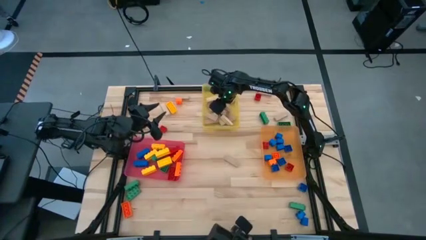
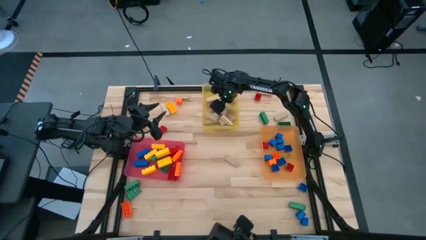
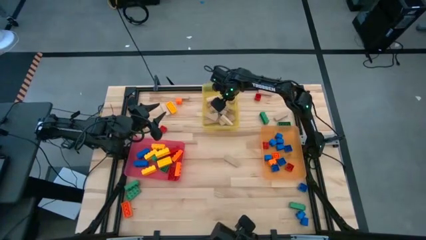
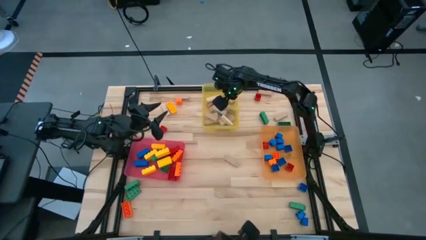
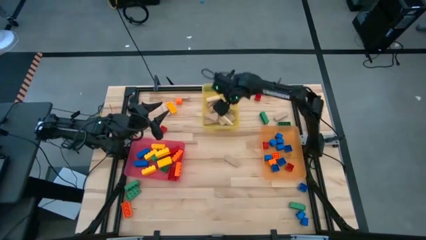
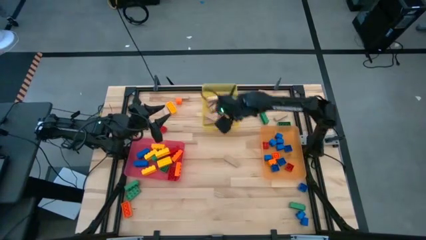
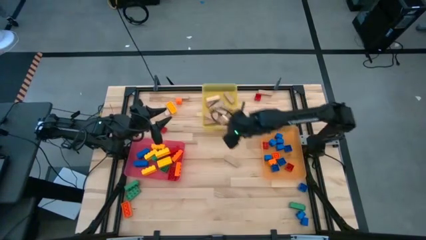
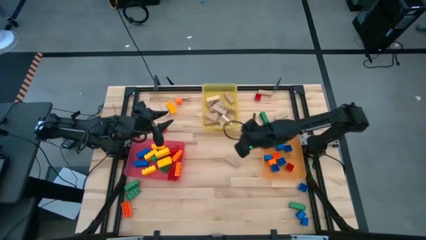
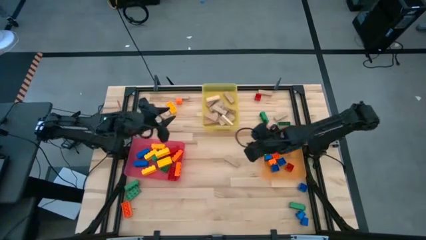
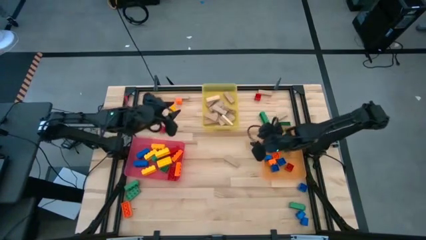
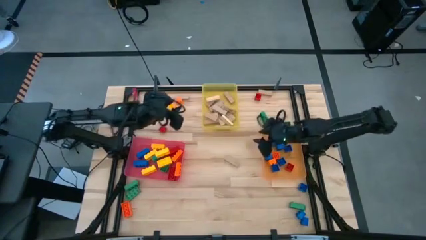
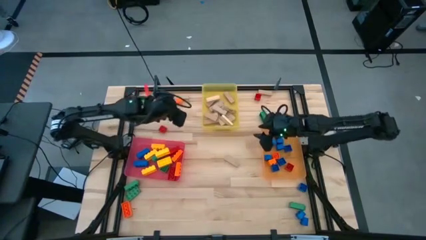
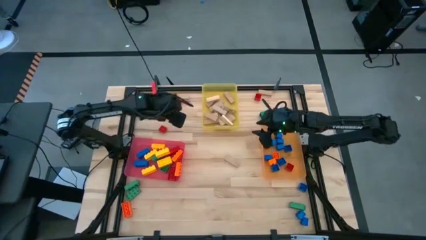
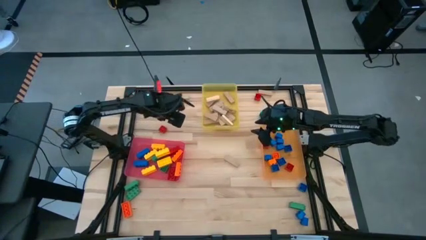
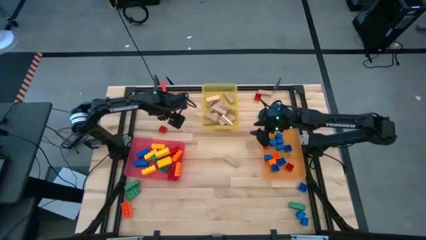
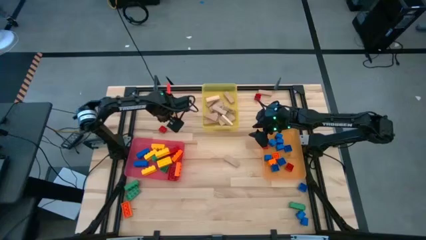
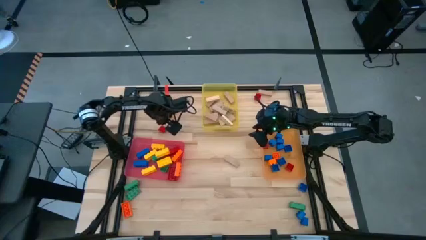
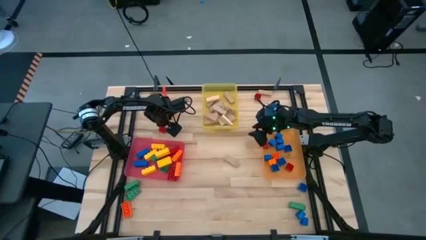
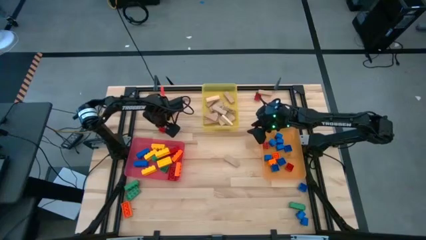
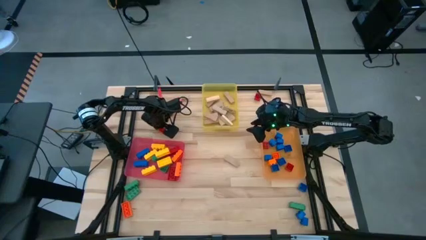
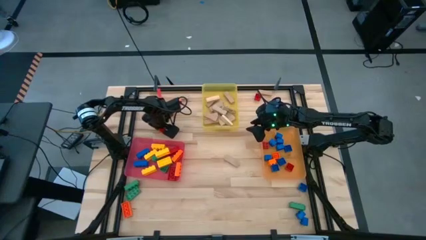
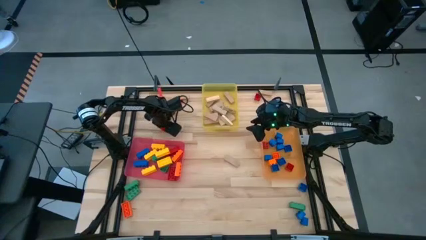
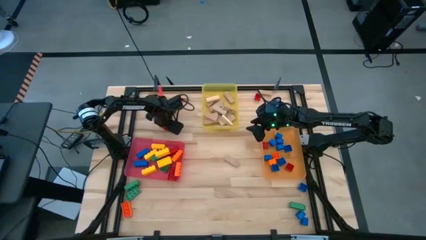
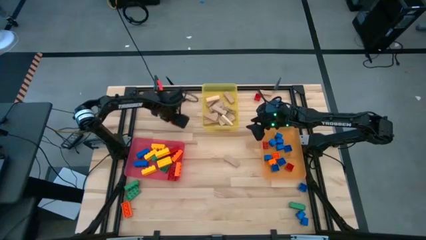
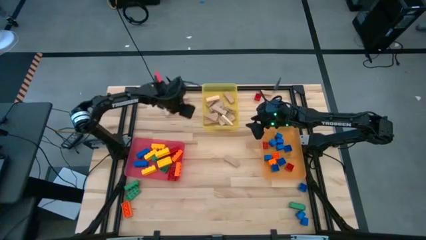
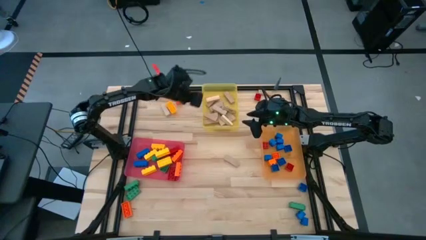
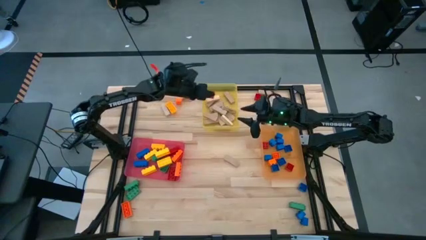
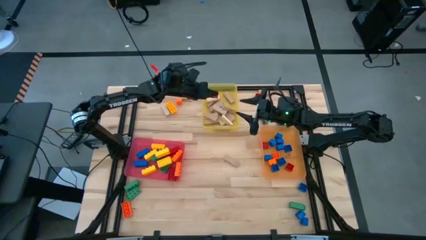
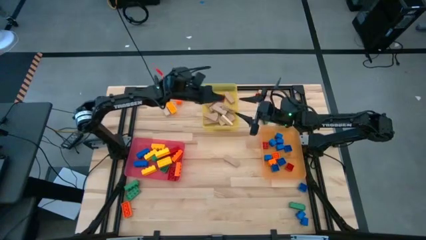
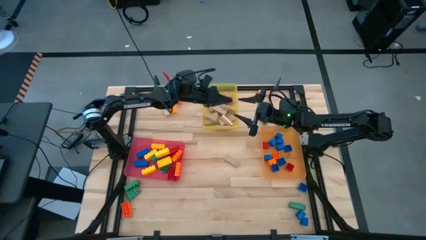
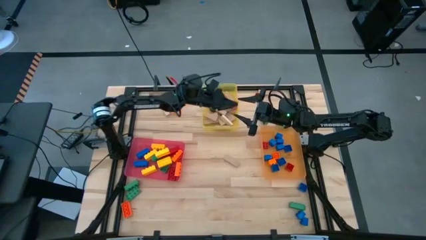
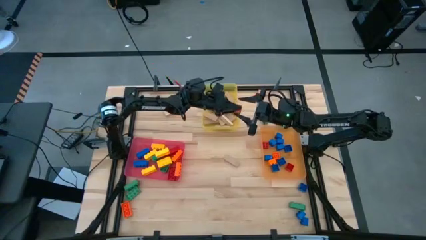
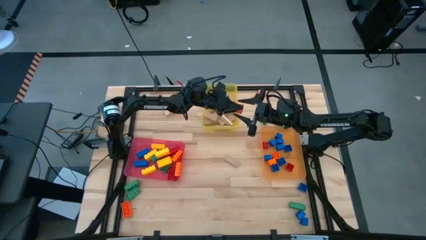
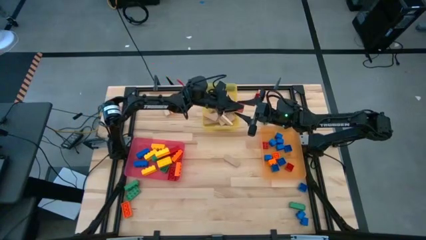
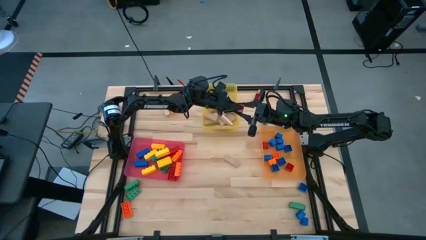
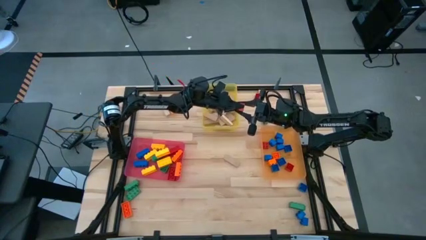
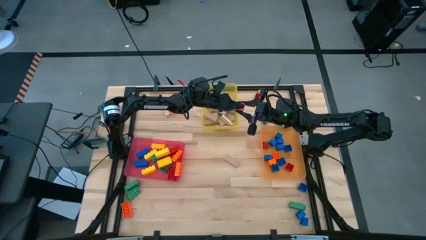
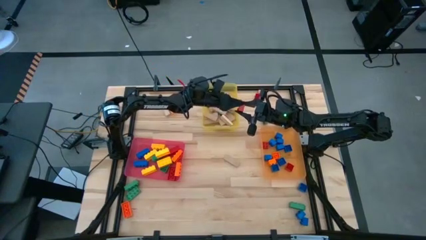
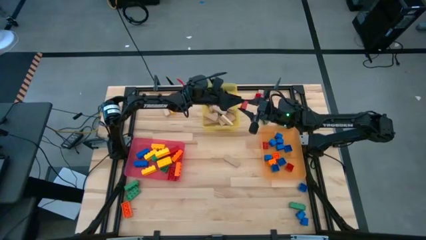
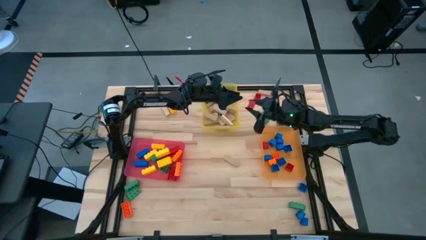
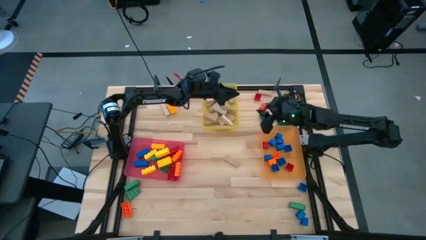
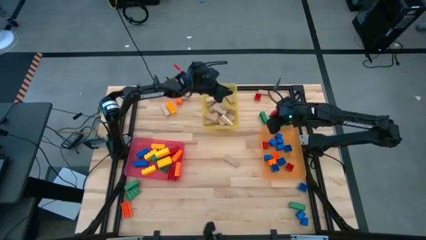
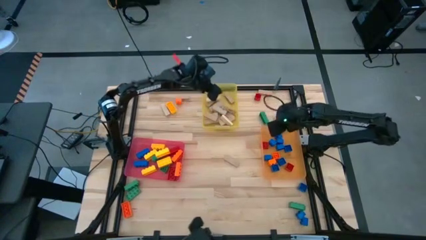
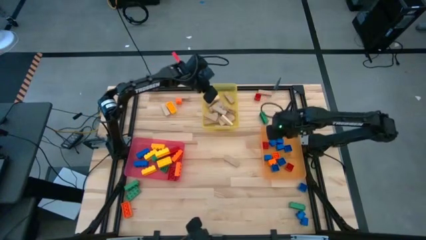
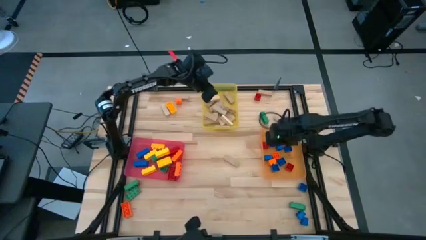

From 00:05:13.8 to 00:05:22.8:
Task: Sort blocks by size
Put the 1 stud red game piece into the orange bin

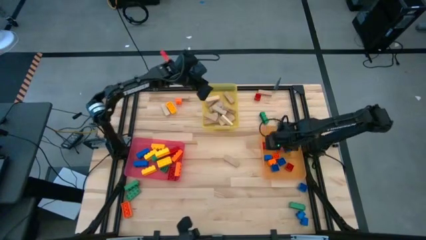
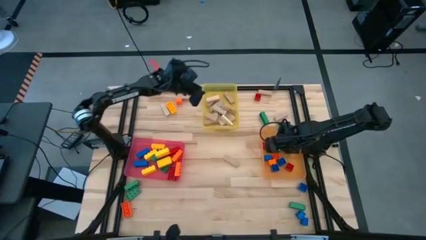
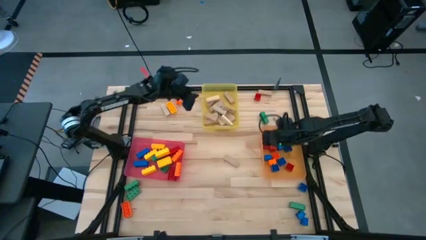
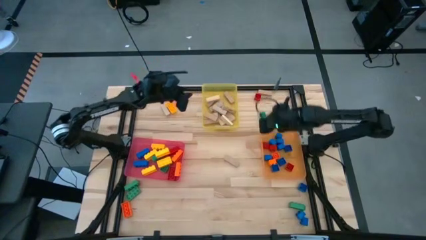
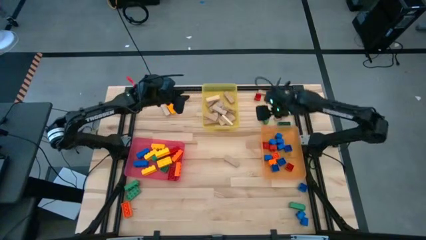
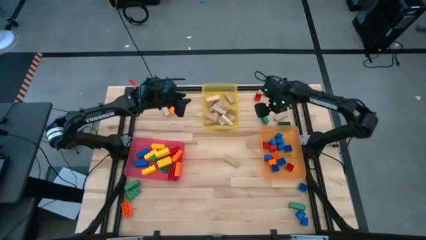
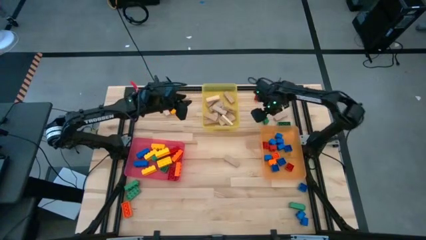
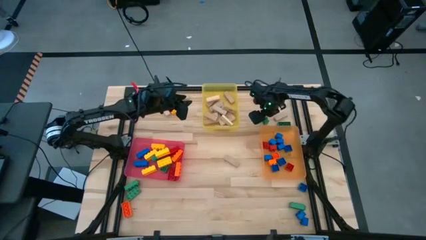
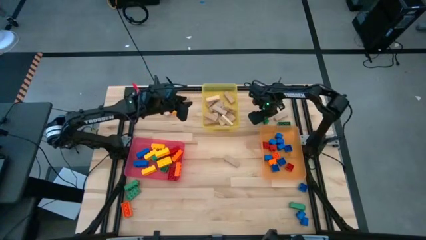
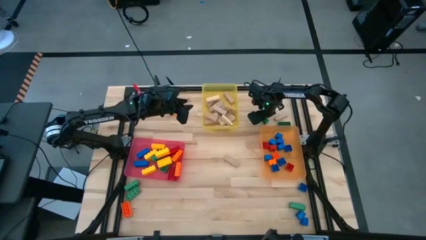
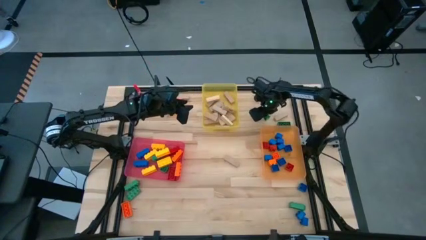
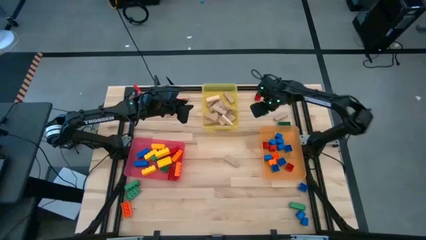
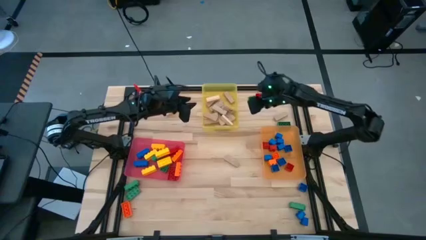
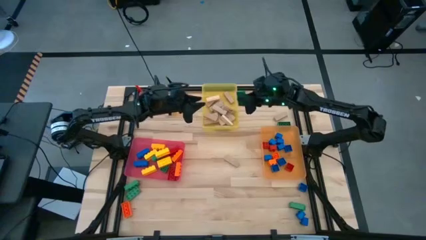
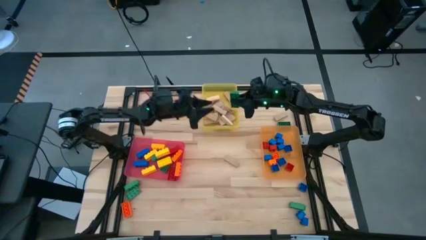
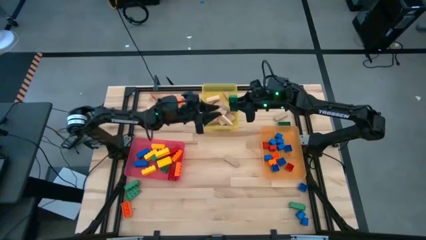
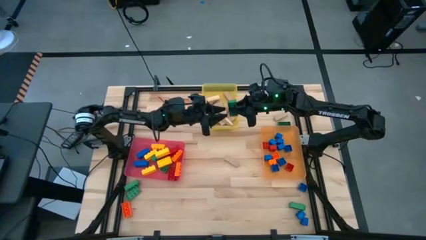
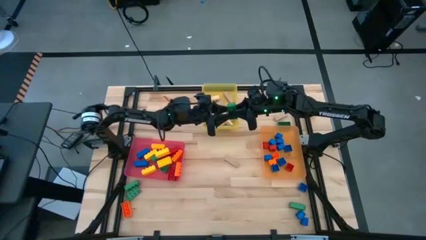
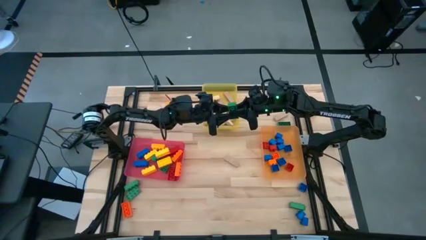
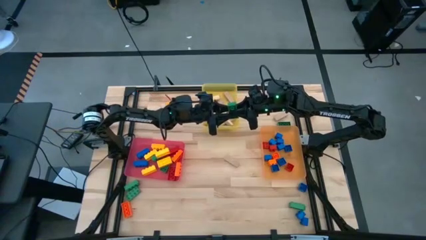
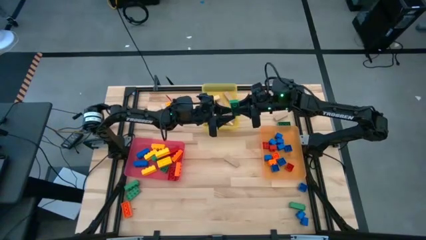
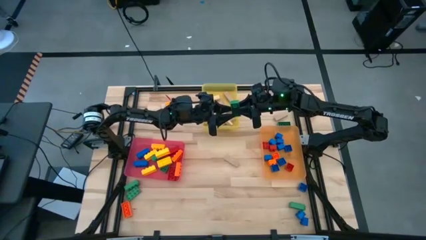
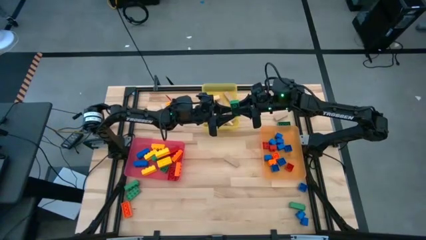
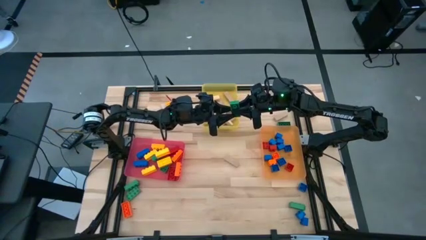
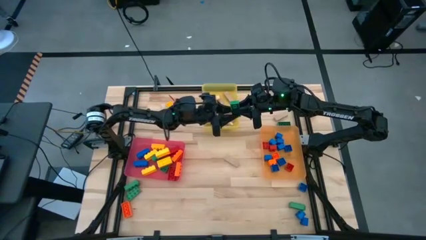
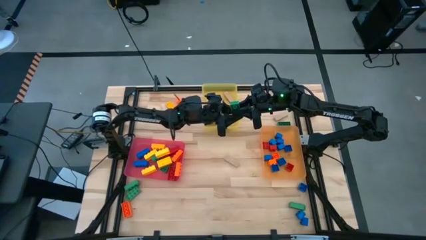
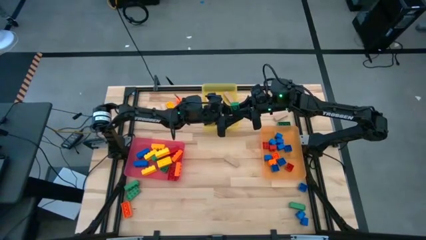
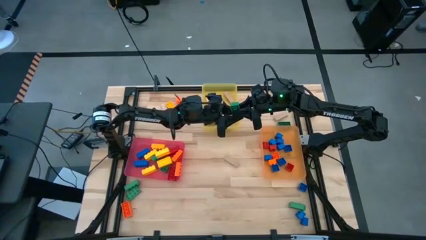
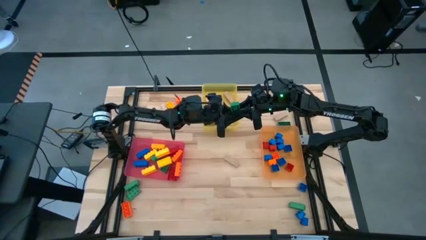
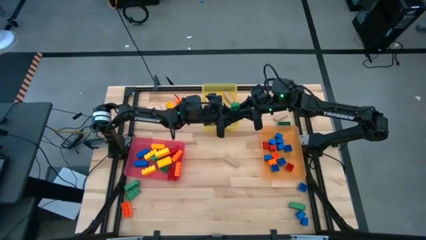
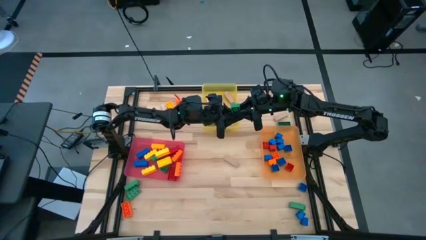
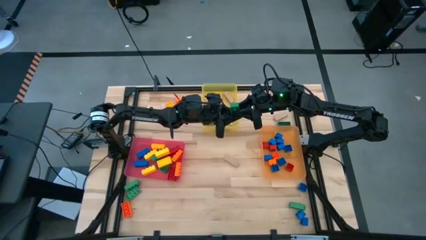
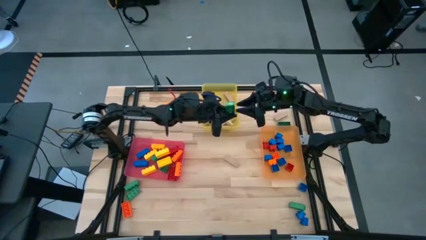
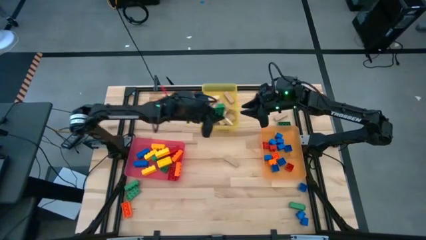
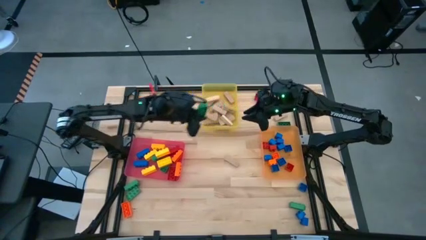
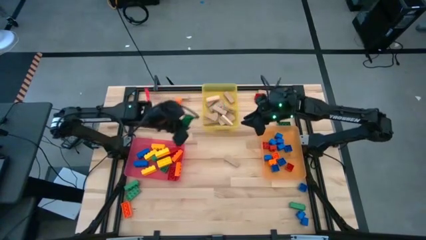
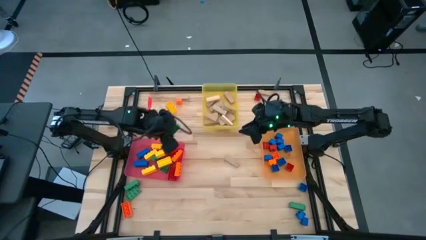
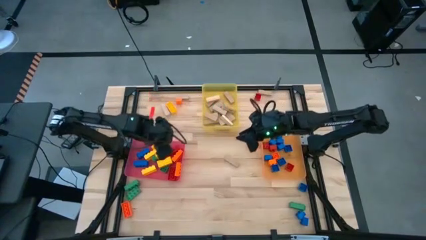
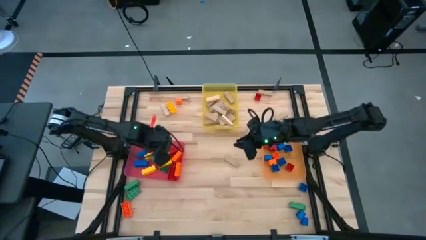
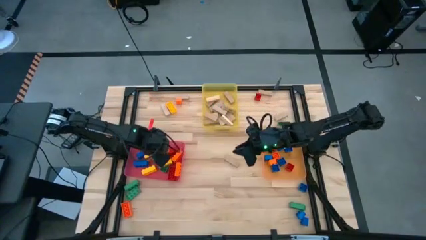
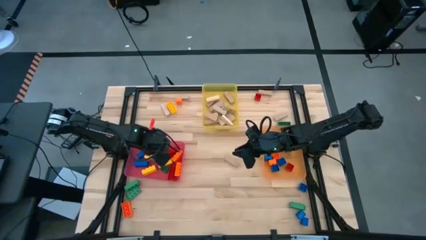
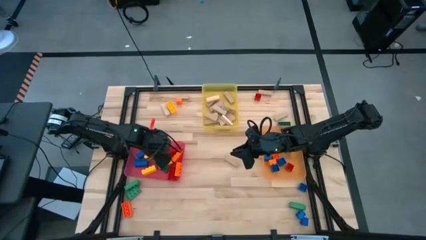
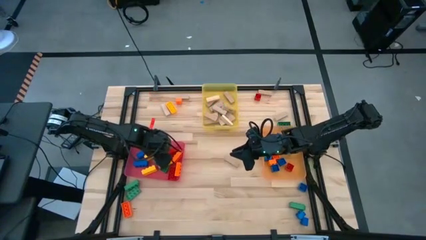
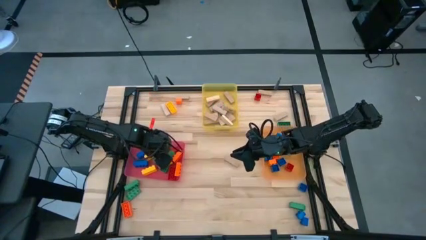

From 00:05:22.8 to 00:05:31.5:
Put the 3 stud green game piece into the pink bin
